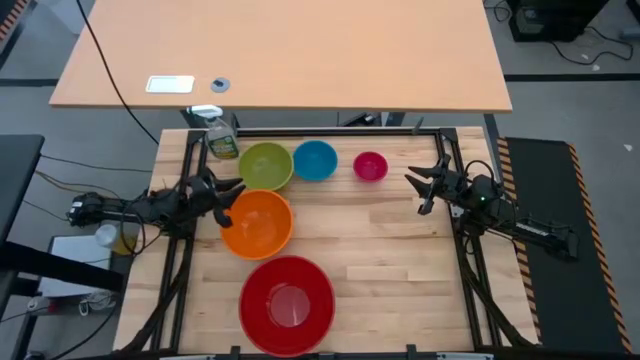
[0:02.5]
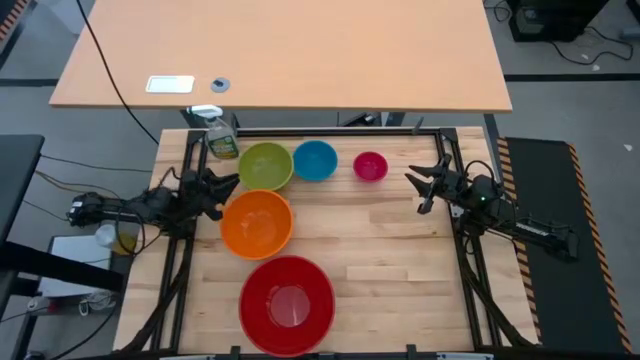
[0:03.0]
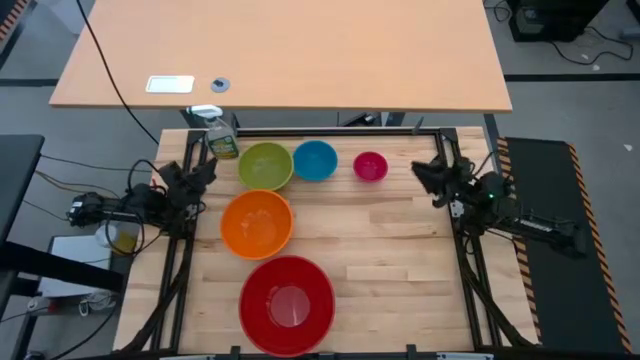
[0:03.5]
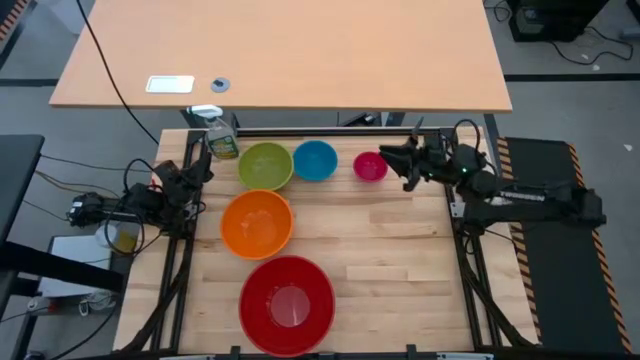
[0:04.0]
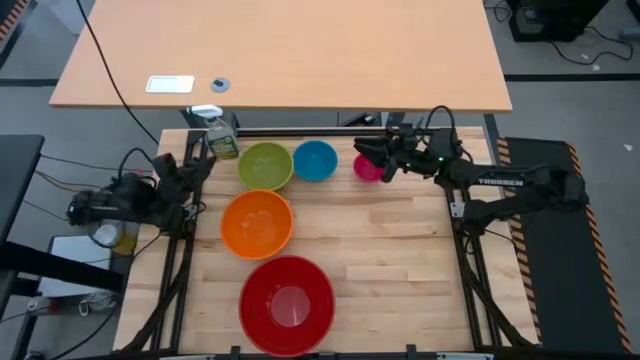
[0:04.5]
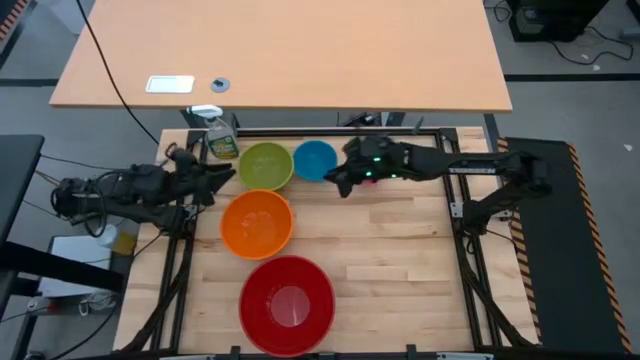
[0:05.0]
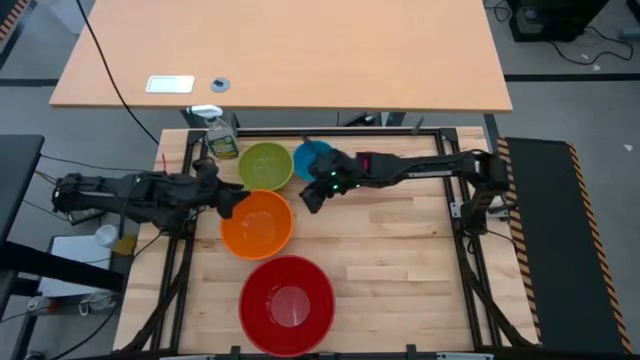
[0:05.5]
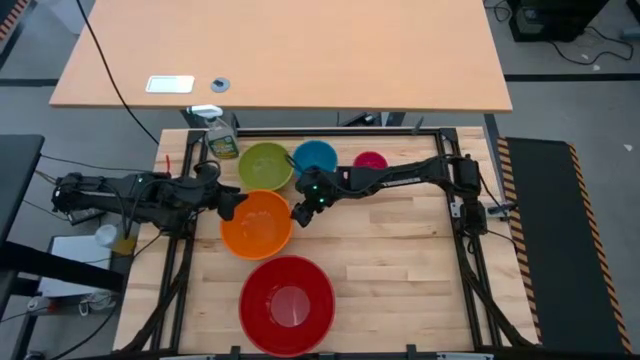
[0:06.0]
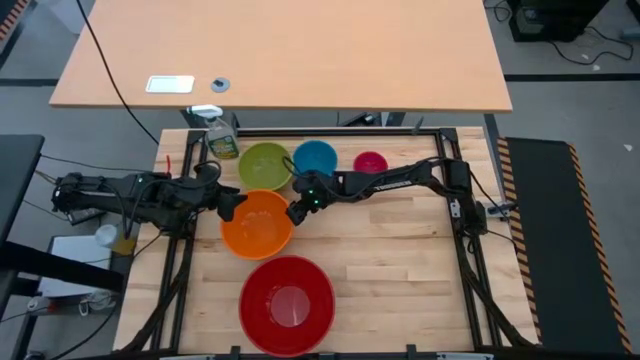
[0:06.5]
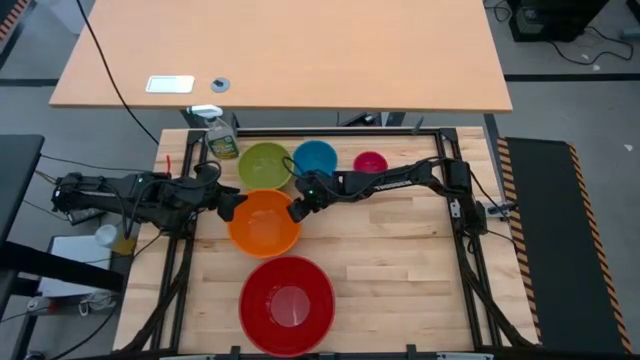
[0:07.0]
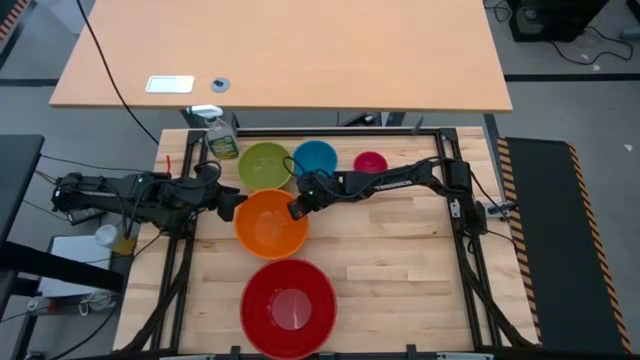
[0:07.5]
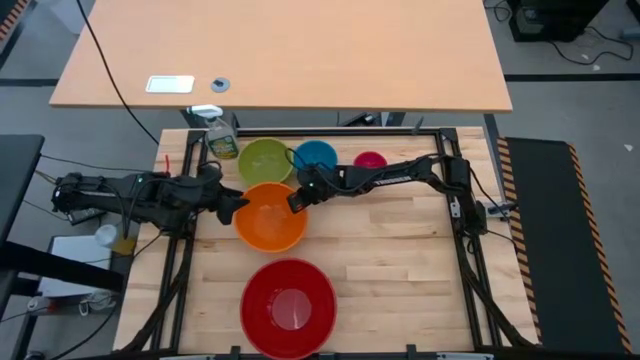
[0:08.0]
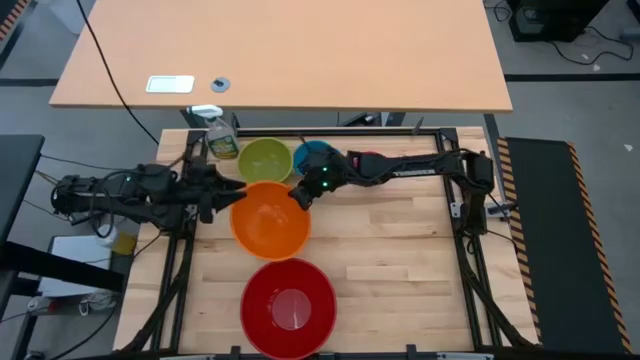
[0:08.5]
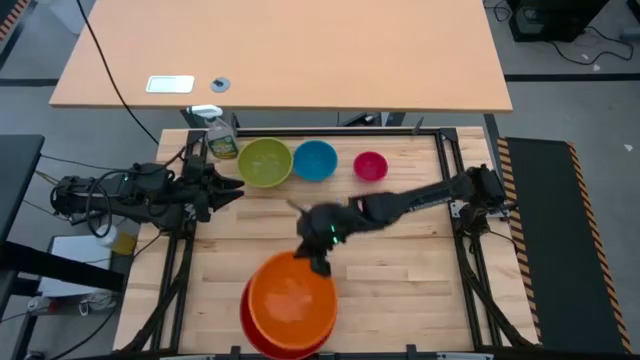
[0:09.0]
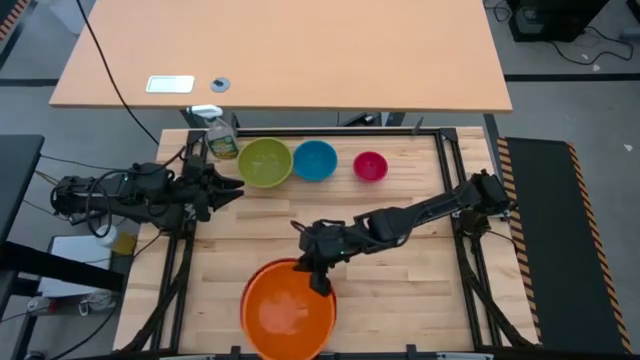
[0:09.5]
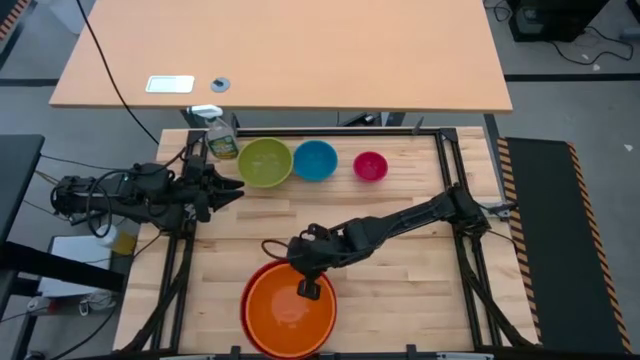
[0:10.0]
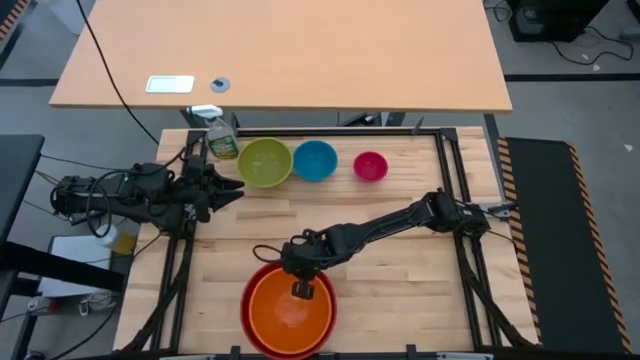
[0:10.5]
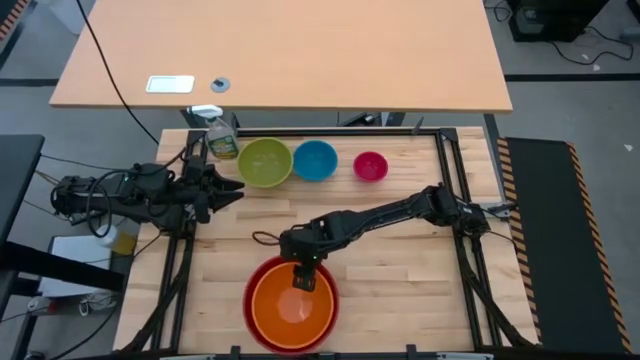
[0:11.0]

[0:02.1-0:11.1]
Stack the orange bowl into the red bowl

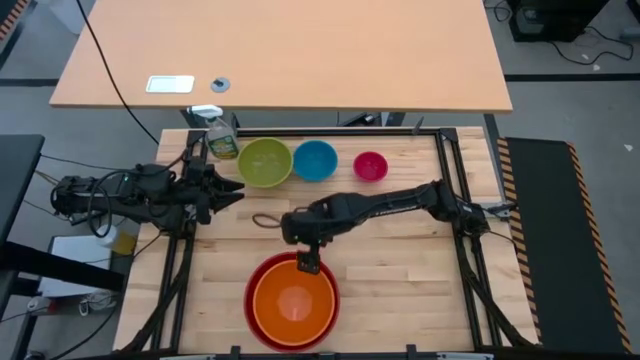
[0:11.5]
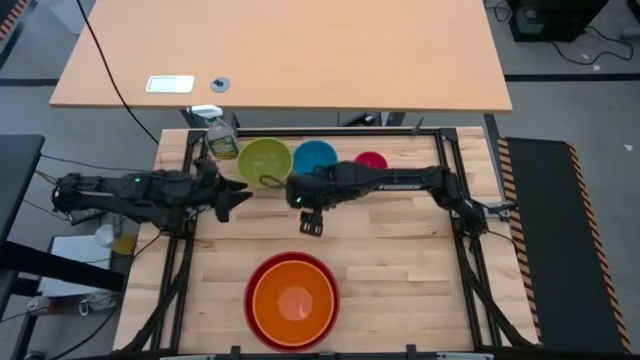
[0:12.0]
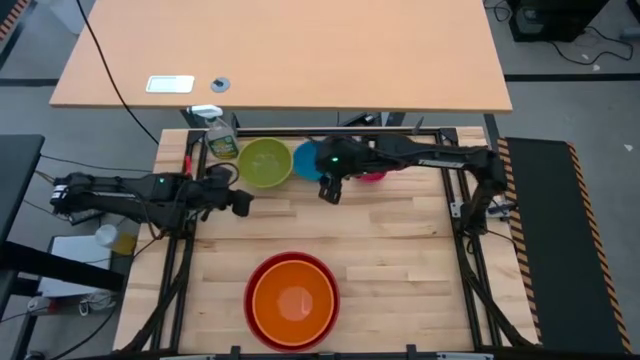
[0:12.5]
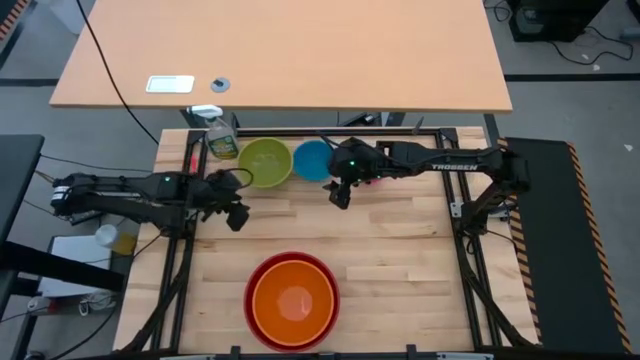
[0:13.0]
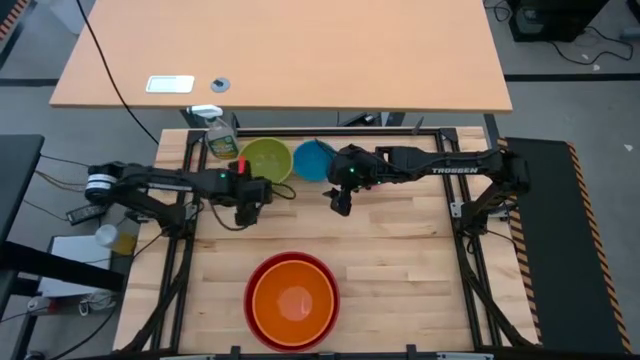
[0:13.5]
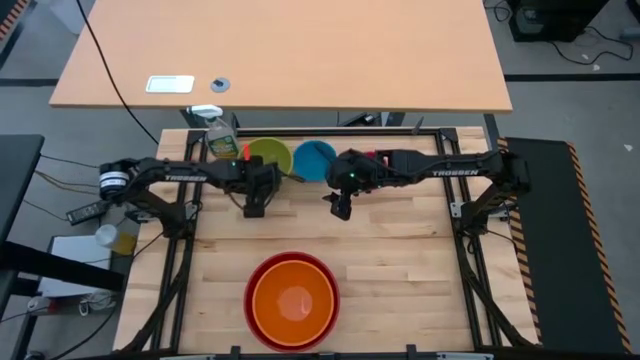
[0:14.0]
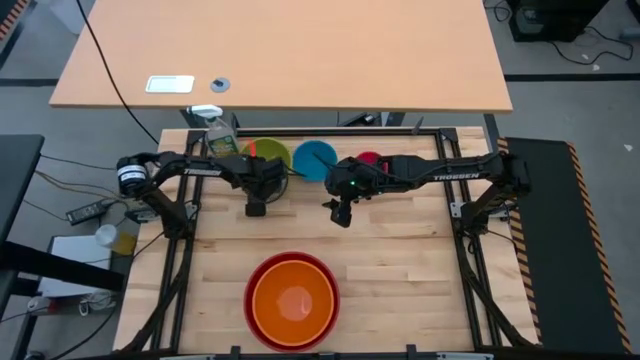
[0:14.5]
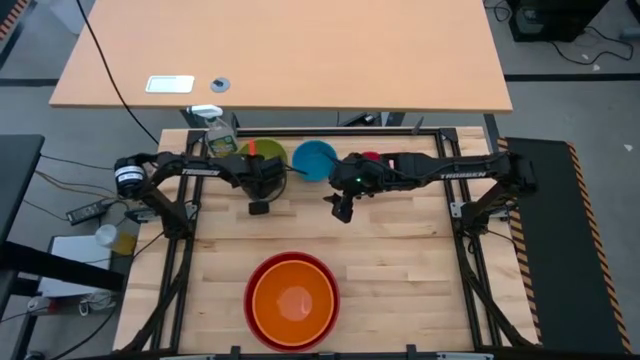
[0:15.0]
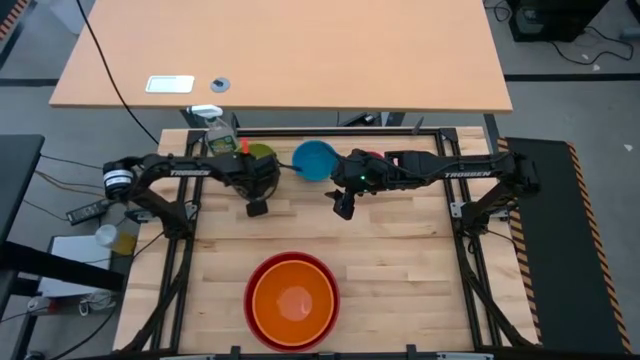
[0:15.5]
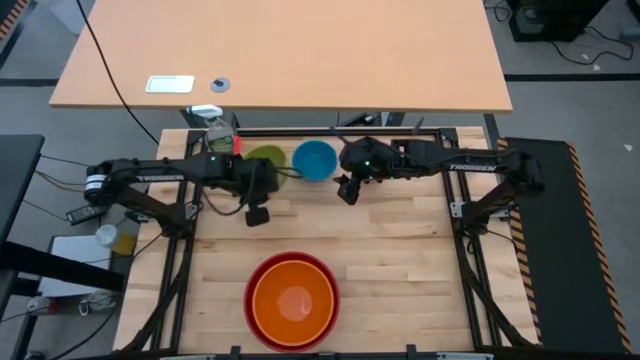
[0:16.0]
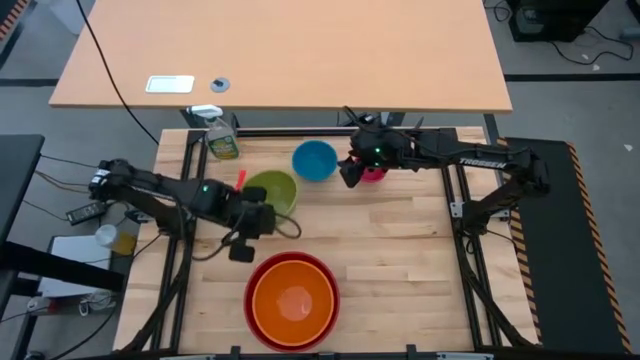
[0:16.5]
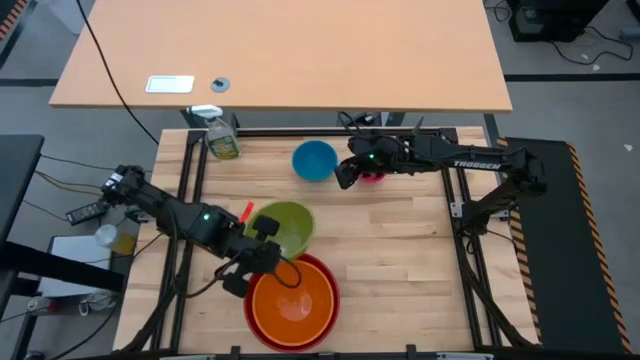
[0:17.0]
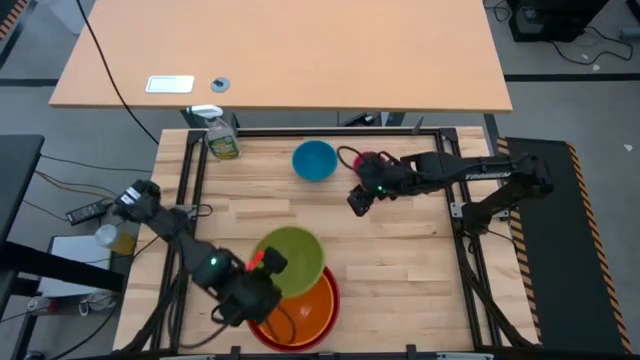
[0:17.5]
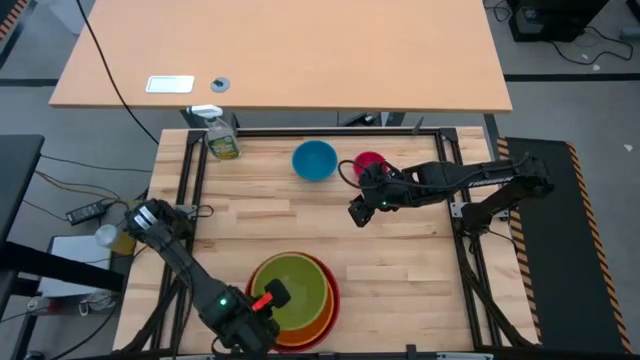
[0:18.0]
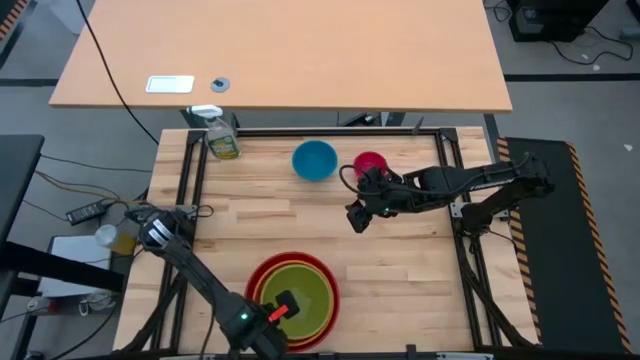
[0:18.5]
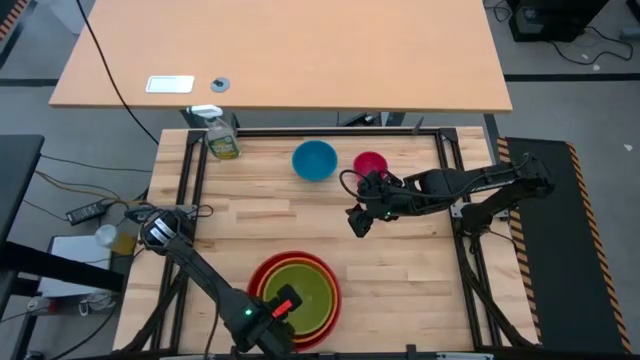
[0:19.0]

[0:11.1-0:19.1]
Stack the green bowl into the orange bowl
